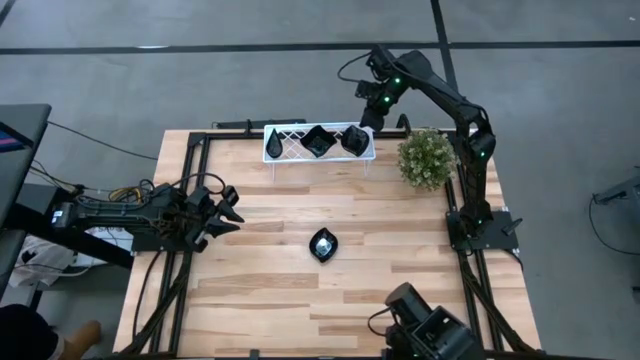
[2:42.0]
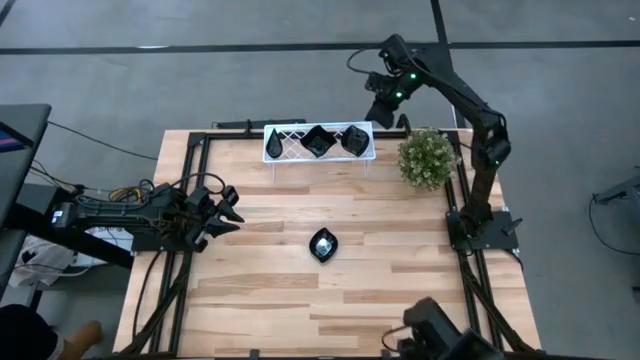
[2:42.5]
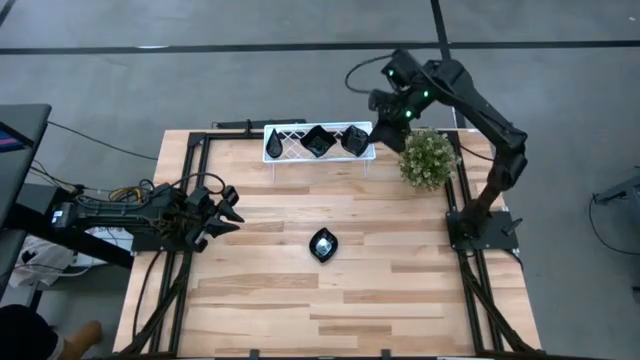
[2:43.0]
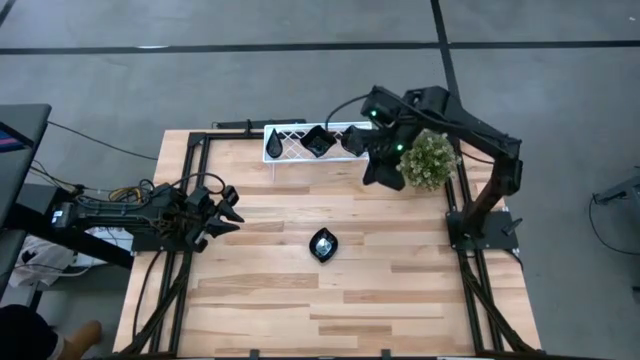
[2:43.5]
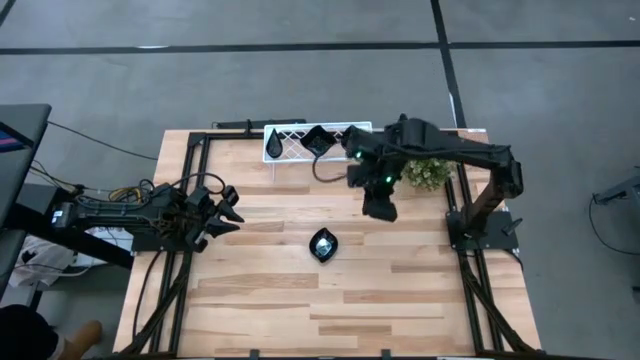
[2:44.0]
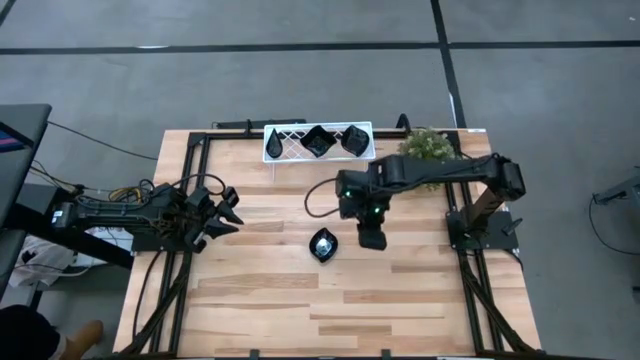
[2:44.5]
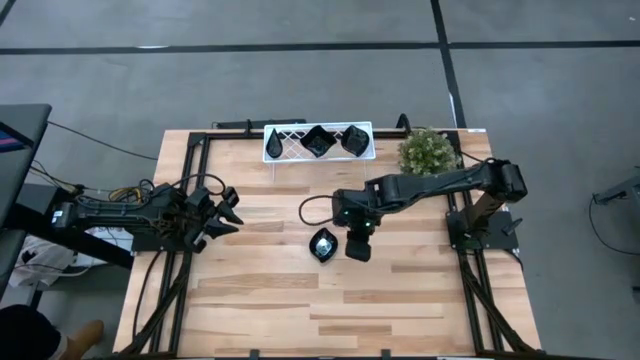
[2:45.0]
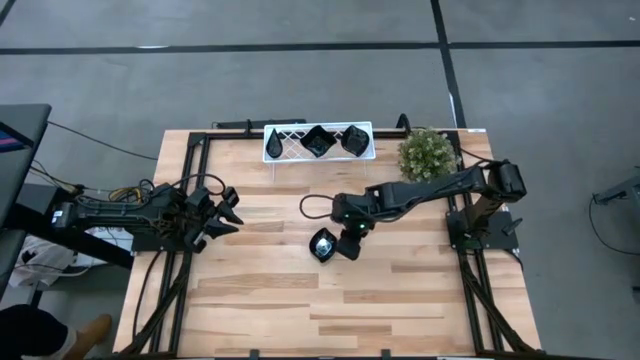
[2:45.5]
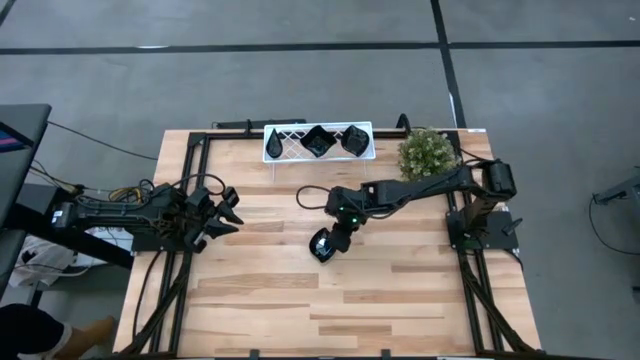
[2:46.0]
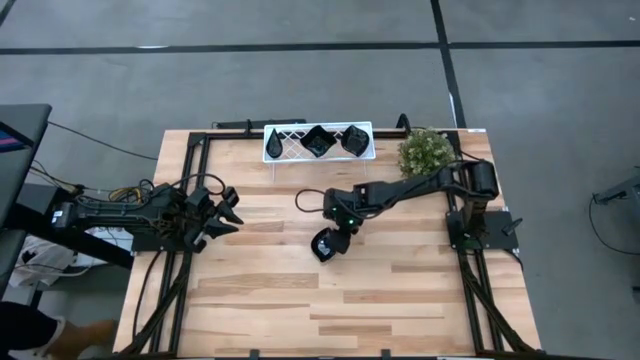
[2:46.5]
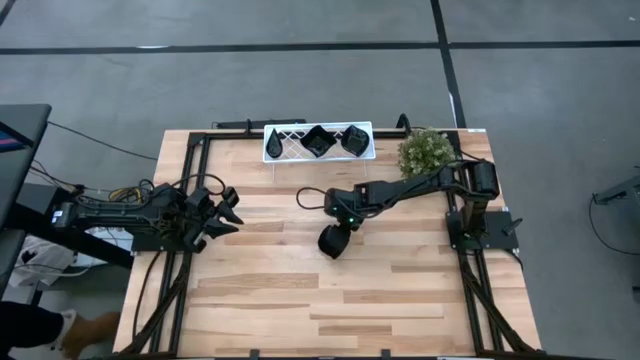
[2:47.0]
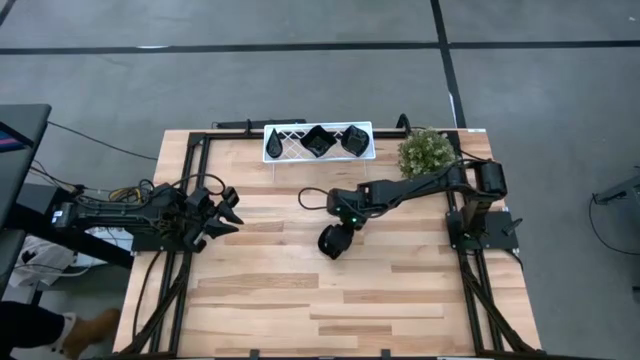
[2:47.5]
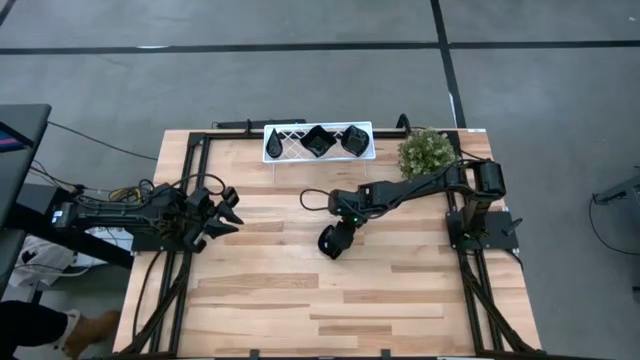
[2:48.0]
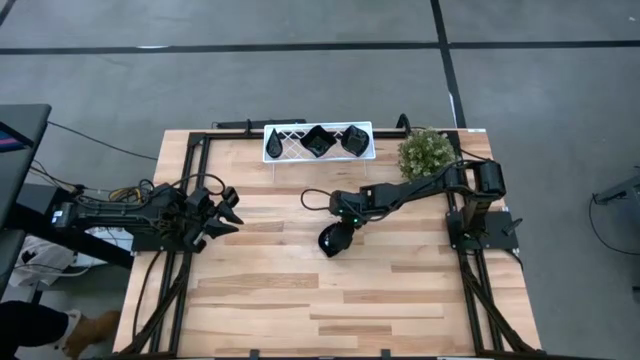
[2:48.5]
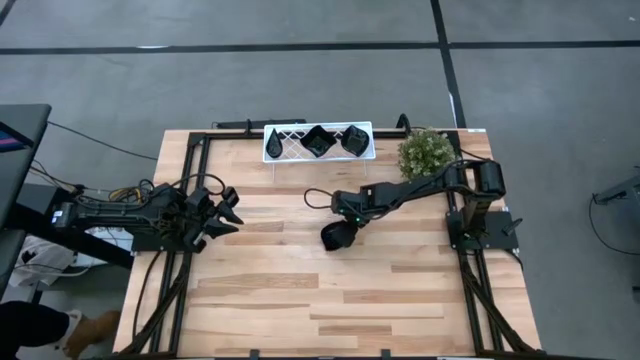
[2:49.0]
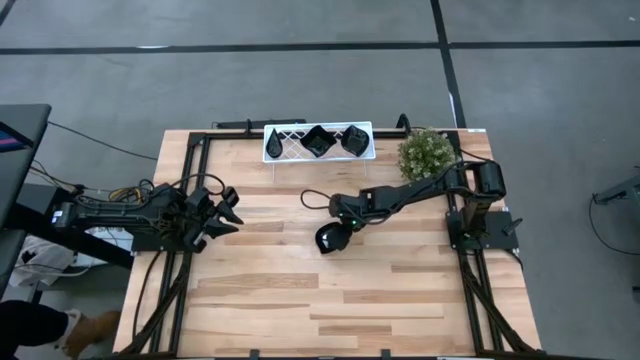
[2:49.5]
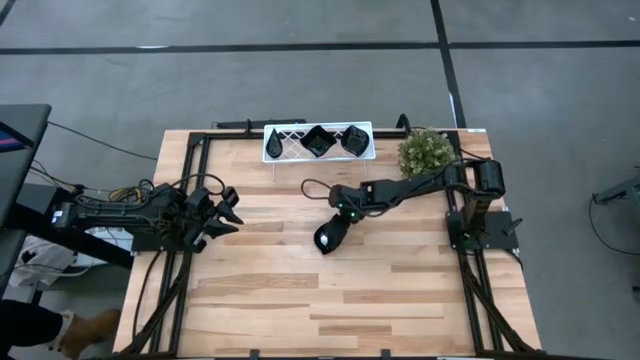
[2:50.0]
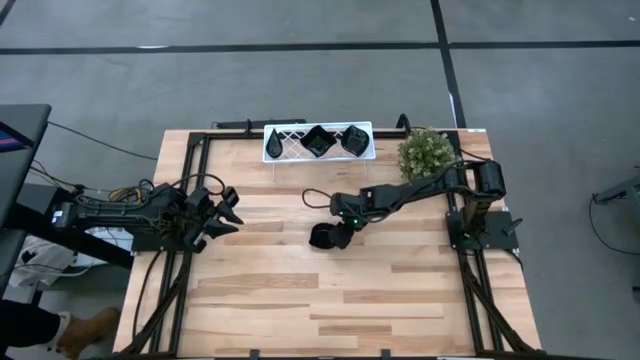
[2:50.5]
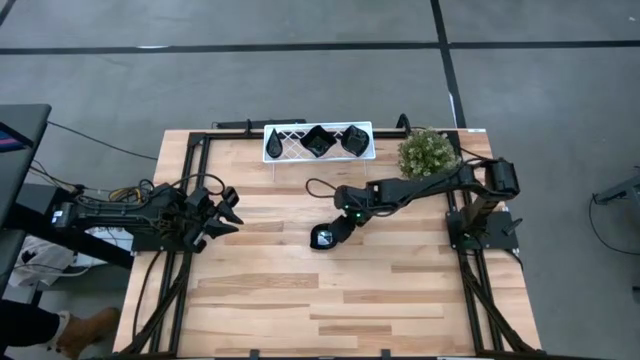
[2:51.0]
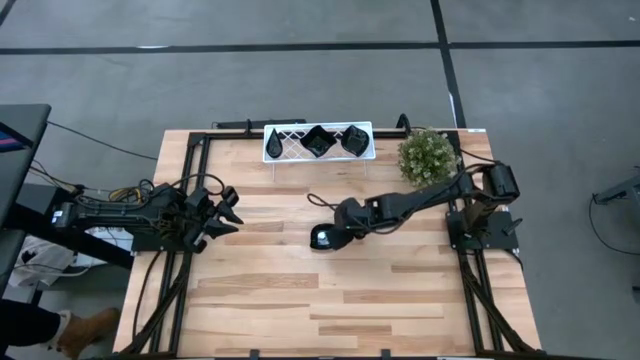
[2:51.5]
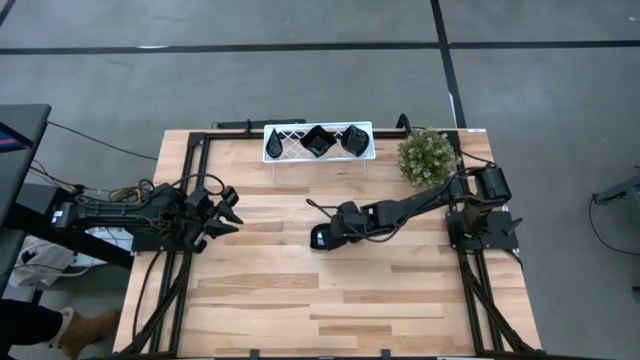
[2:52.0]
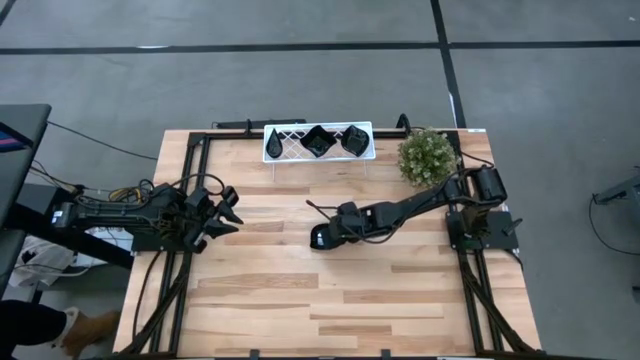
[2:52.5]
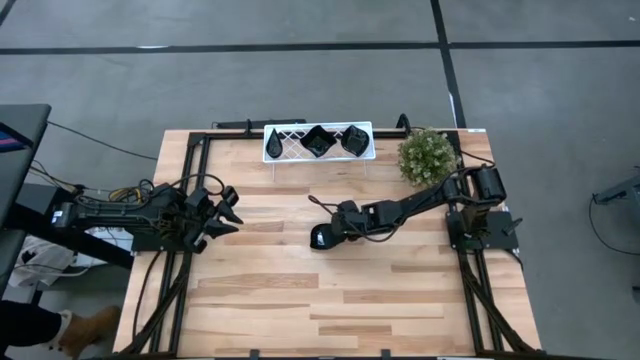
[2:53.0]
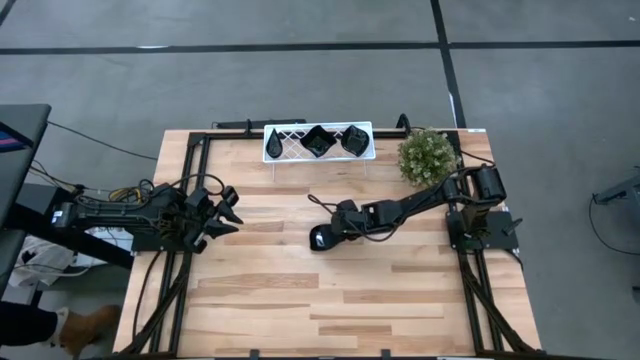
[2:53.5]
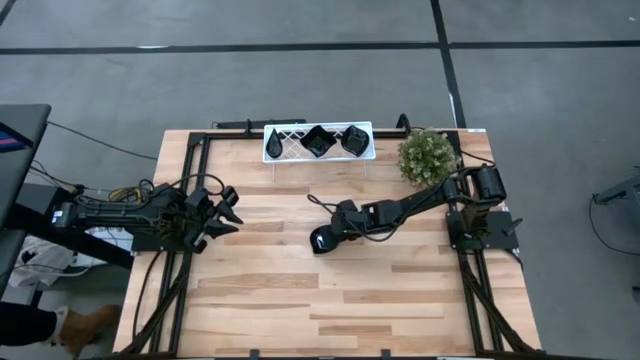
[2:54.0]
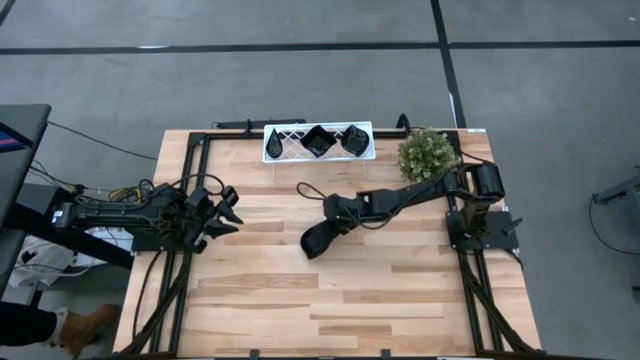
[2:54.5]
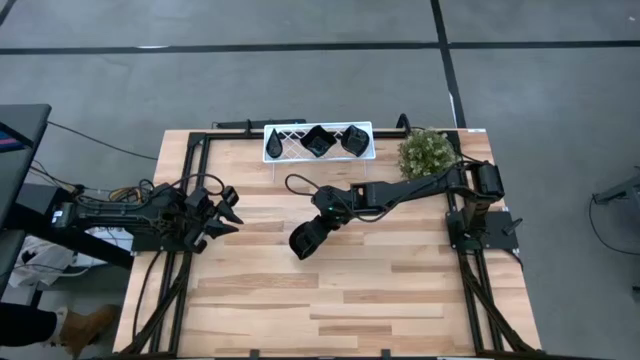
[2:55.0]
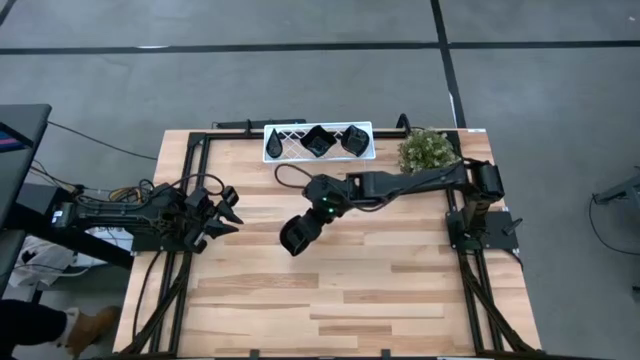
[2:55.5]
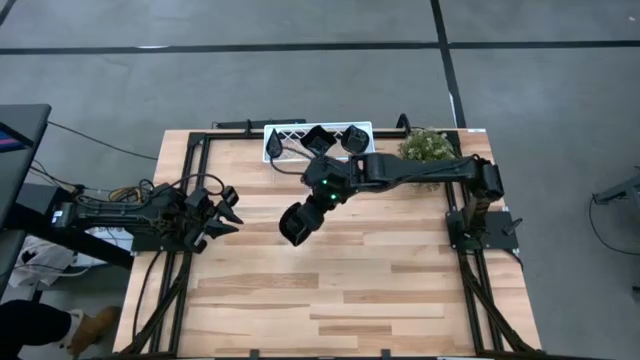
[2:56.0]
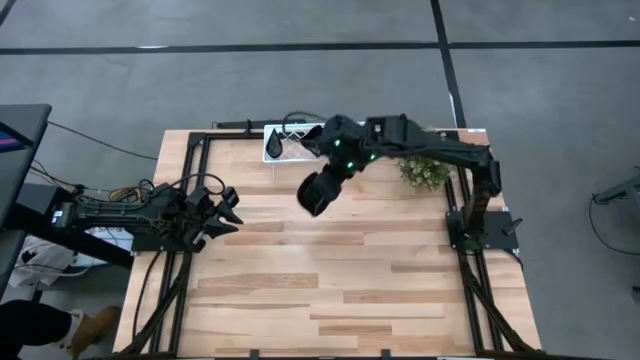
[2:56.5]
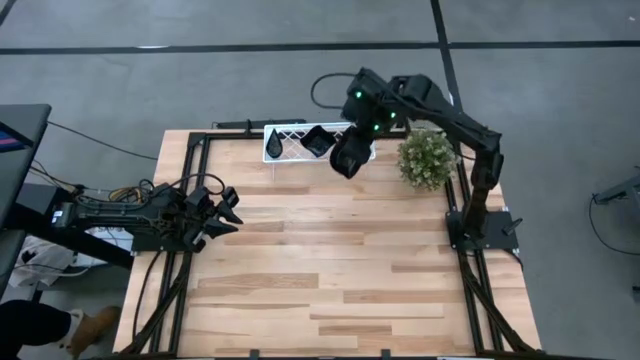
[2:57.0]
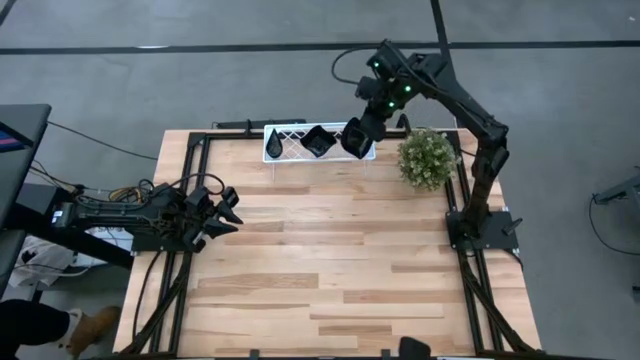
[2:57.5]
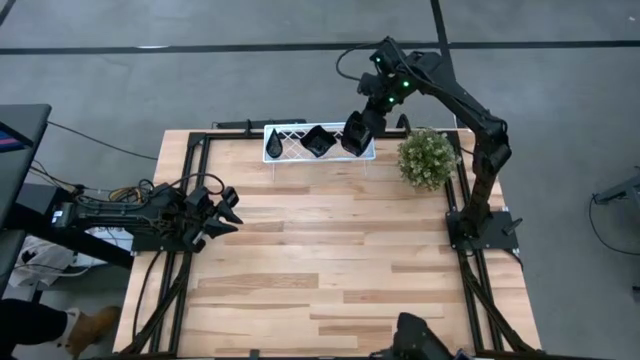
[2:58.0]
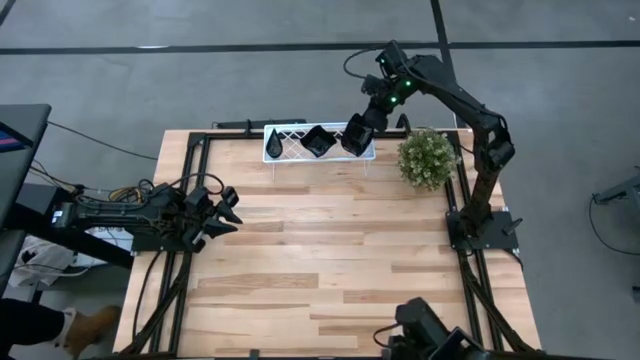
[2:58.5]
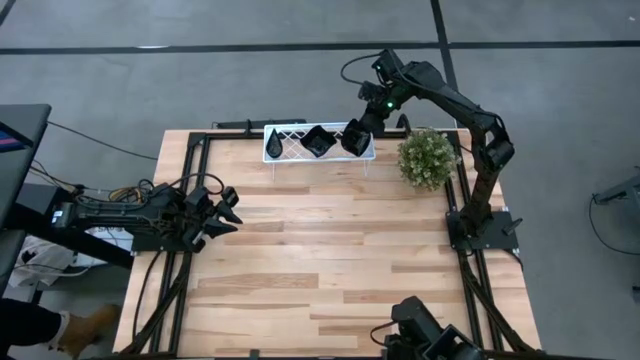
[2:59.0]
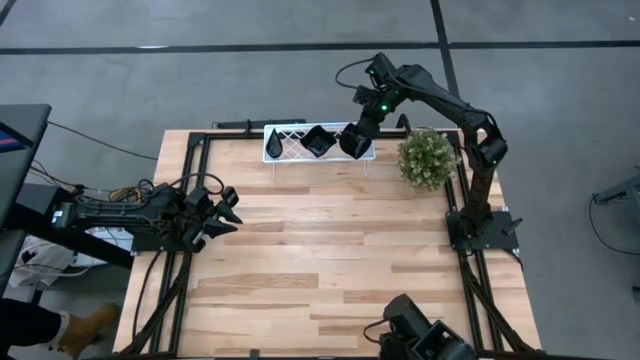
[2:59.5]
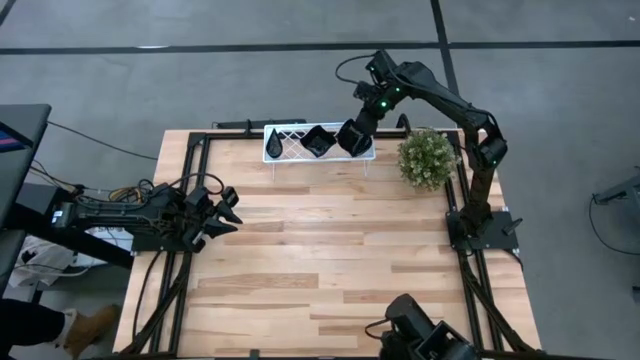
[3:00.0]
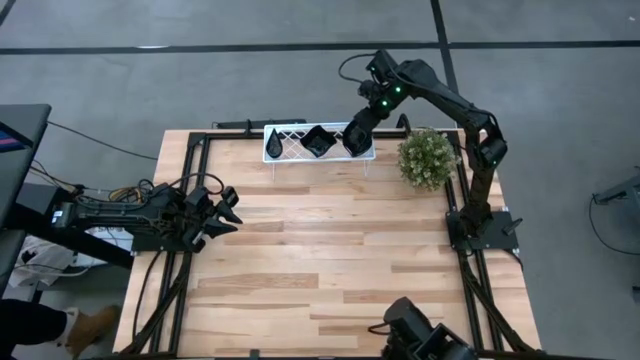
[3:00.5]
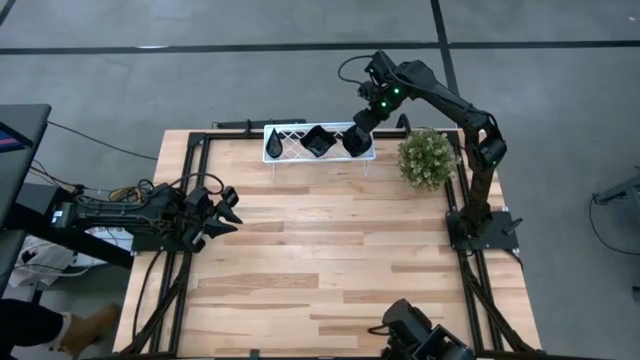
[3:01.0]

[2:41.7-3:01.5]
Task: Pick & Place Mini shaped plates
Stack the black leaf-shaped plate on top of the black leaf-shaped plates on the shelf

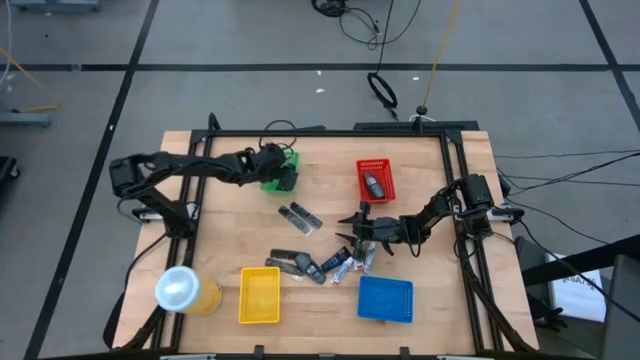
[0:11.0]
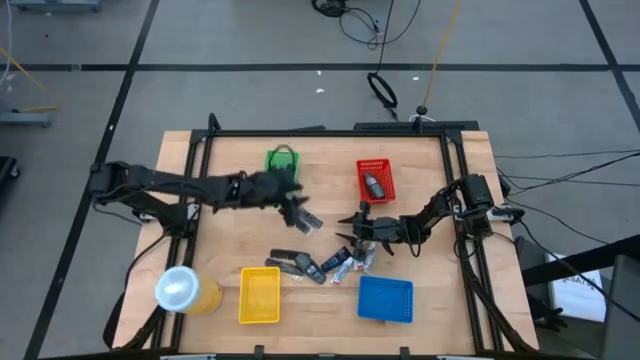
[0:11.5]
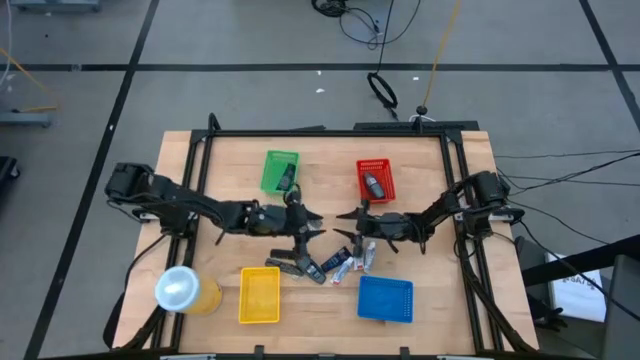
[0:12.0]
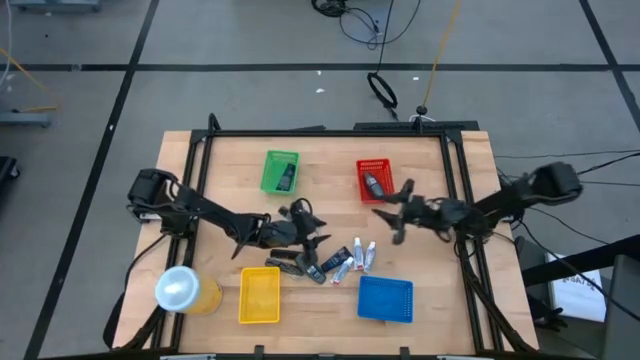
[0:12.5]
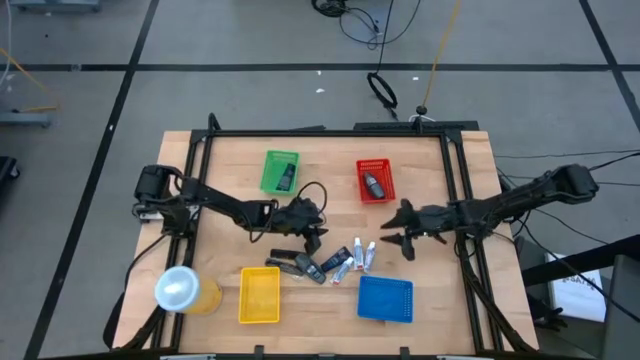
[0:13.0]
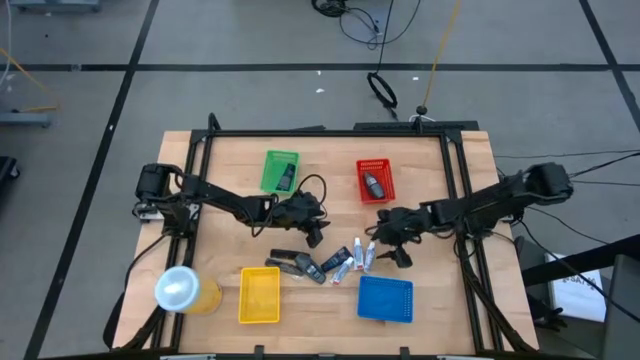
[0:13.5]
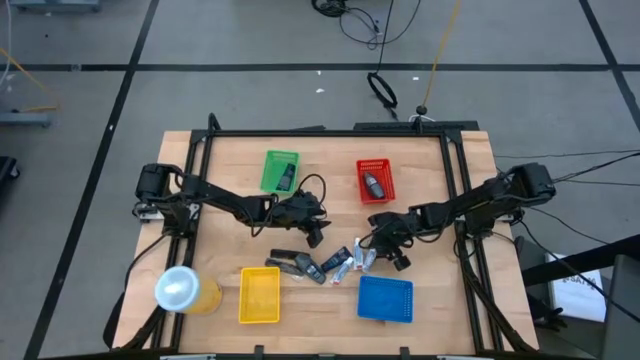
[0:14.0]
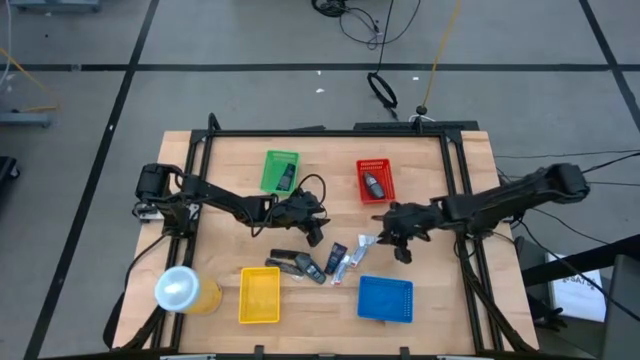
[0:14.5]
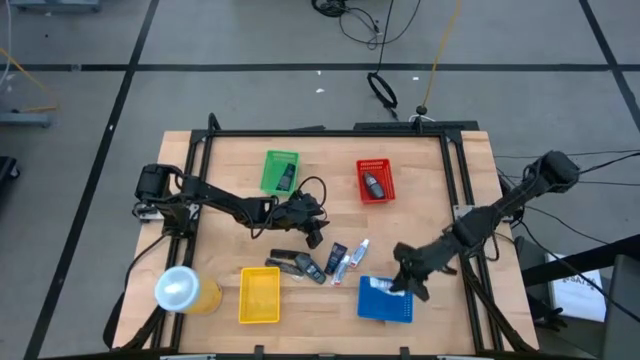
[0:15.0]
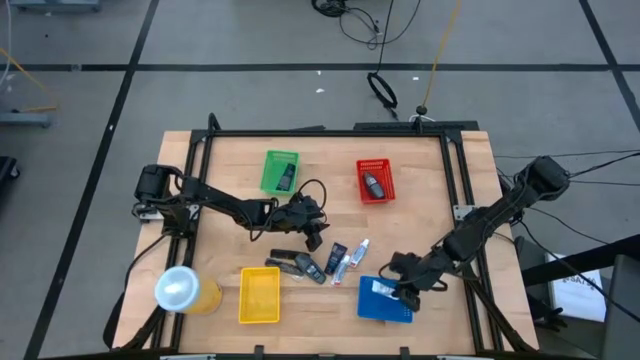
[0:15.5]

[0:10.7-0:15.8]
Task: Pick & Place Travel size toiletries
Put the right white toothpaste into the blue bin
